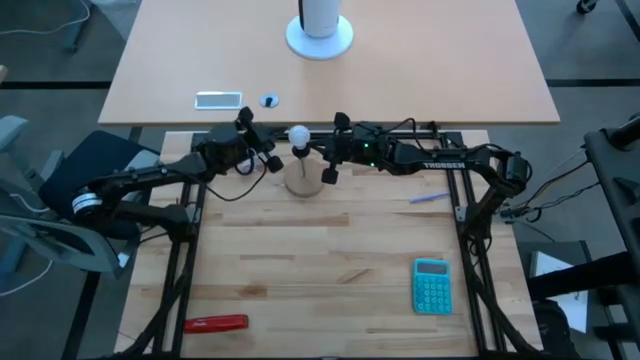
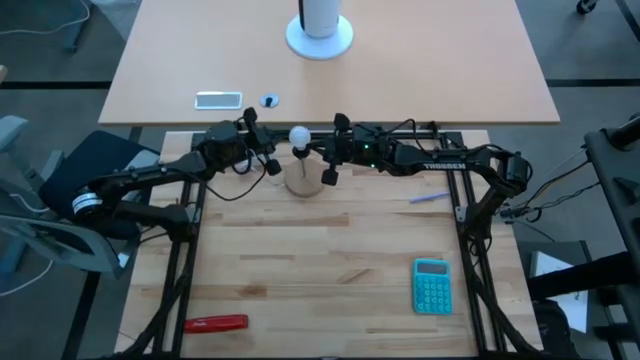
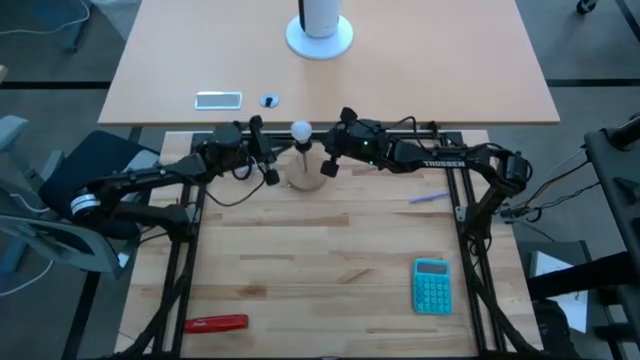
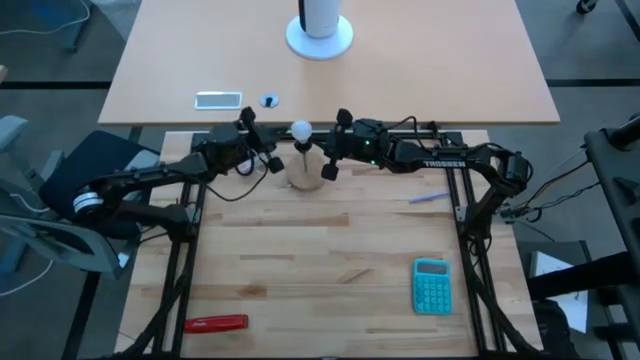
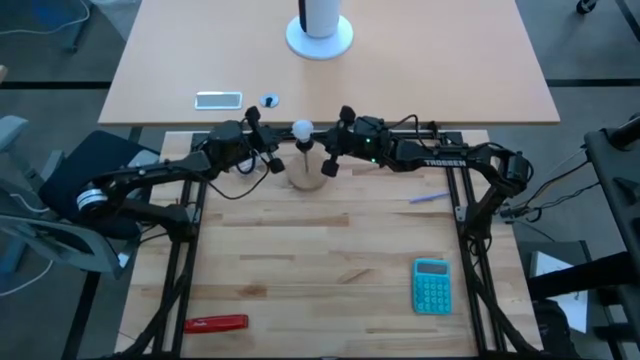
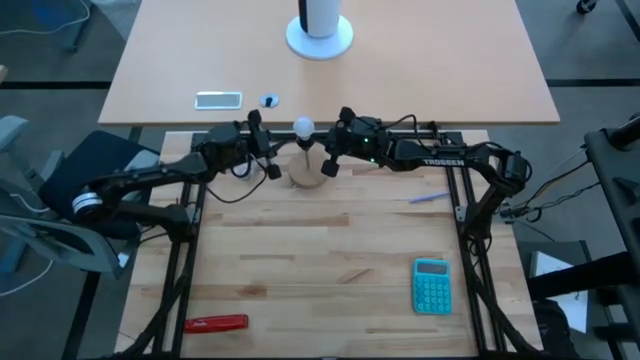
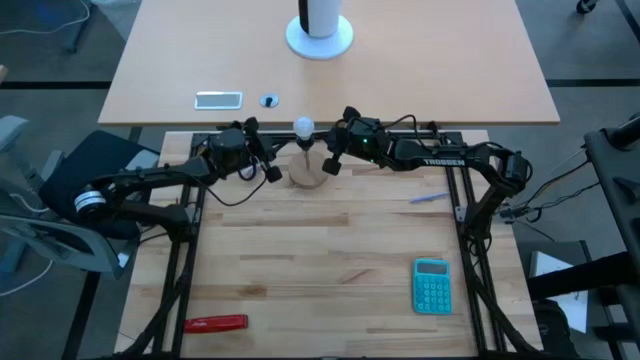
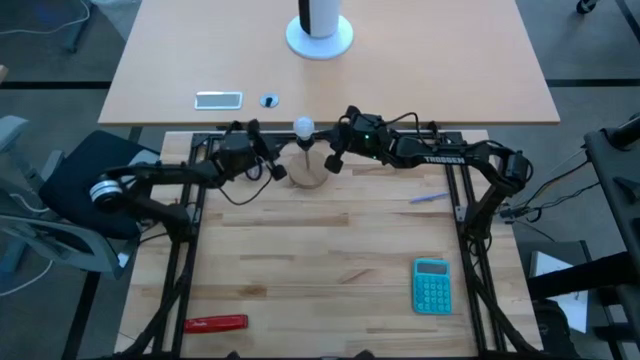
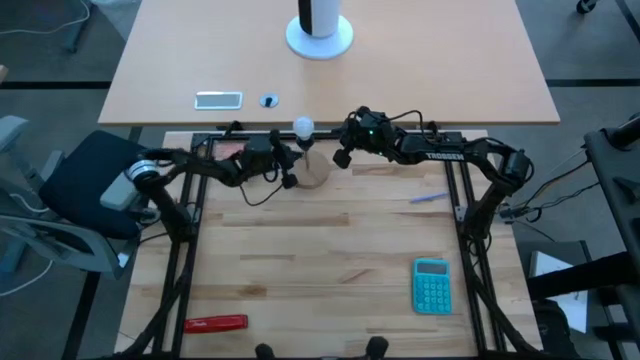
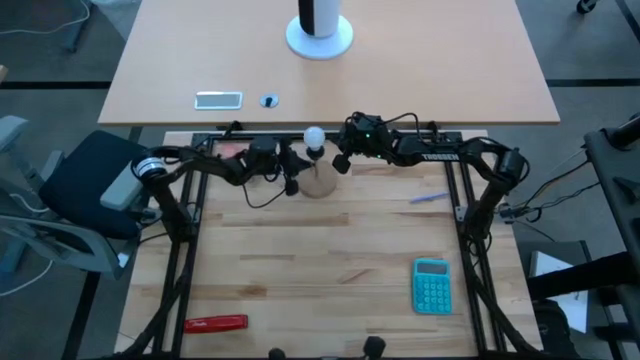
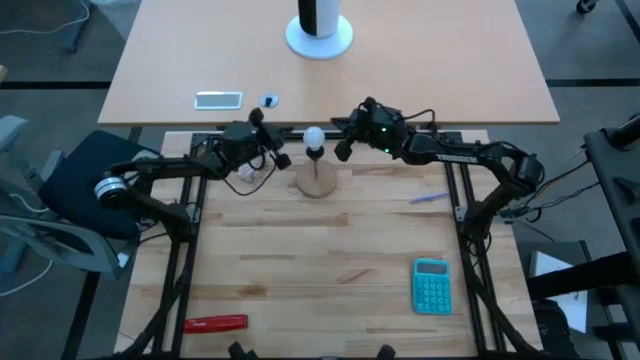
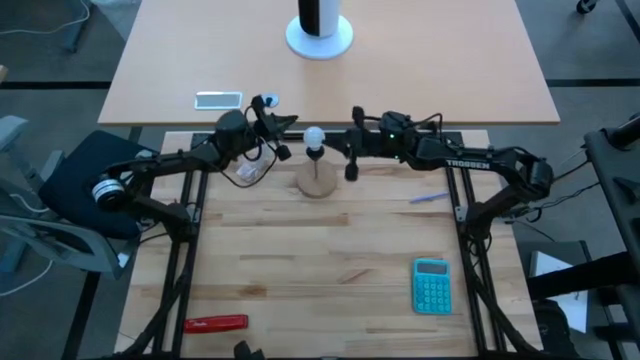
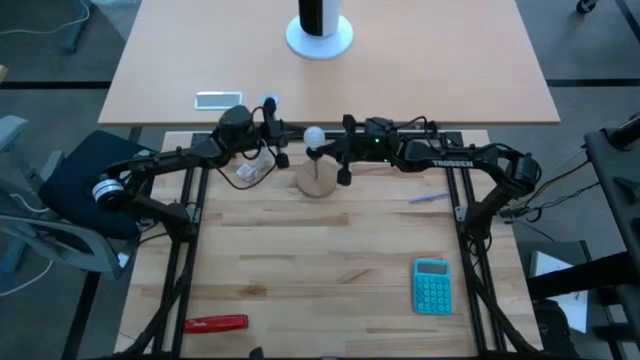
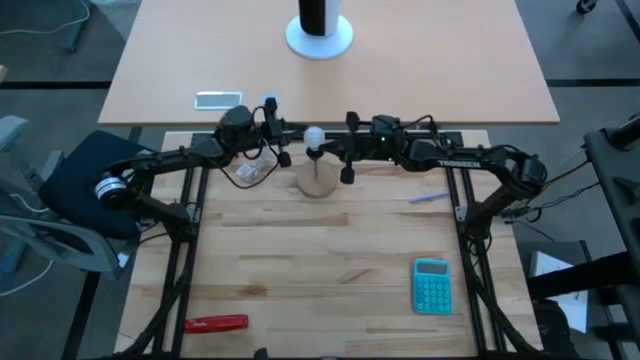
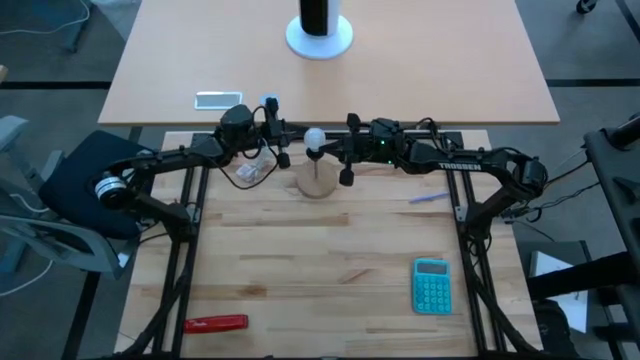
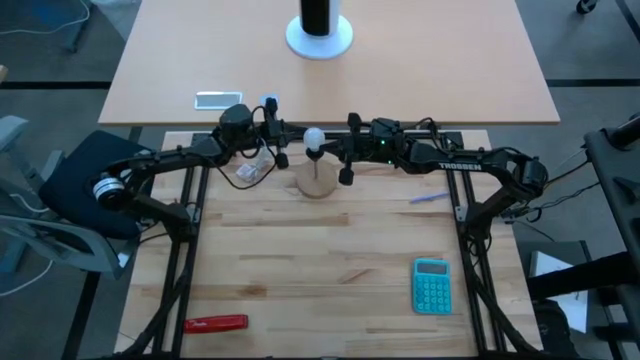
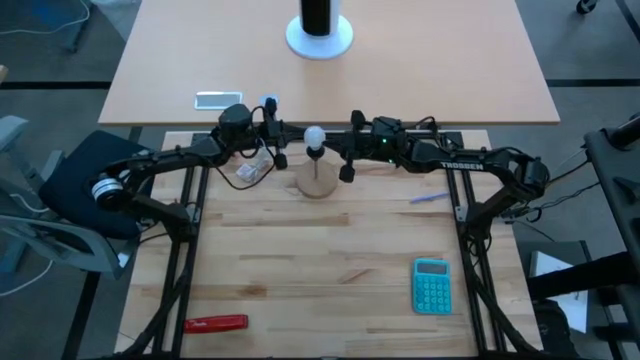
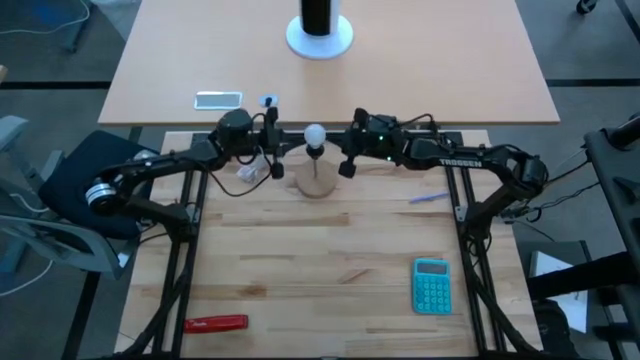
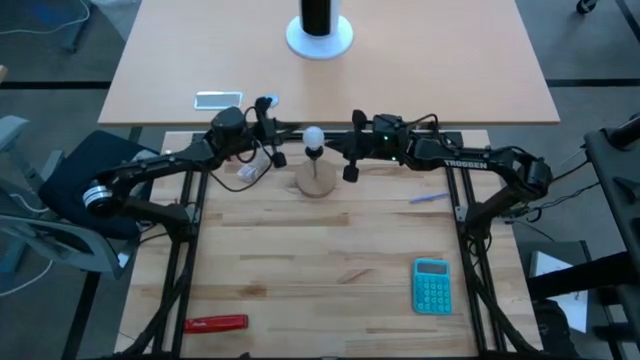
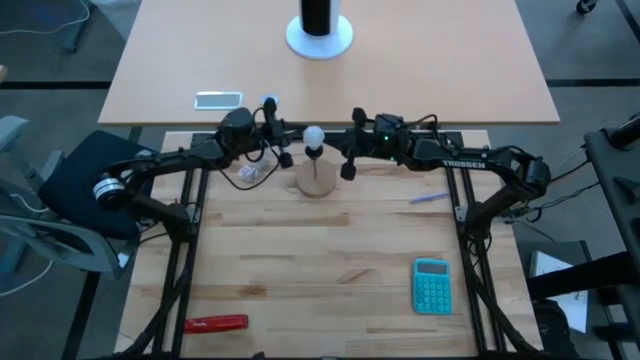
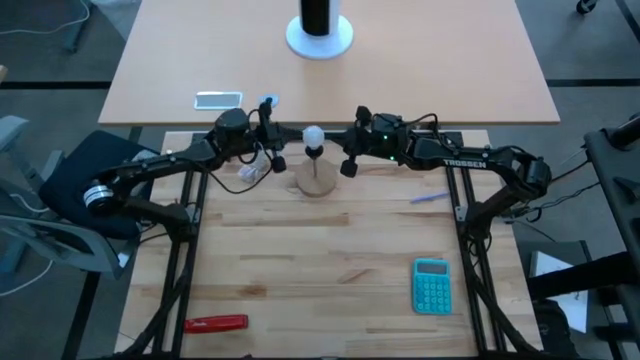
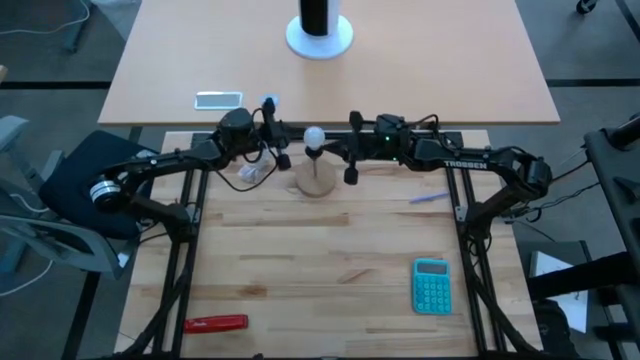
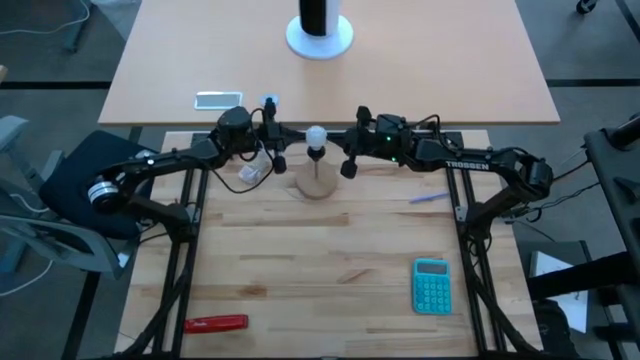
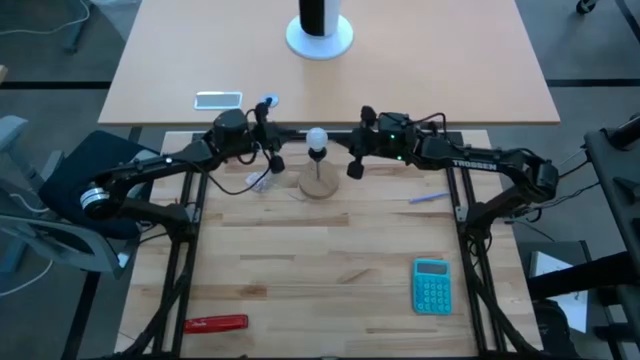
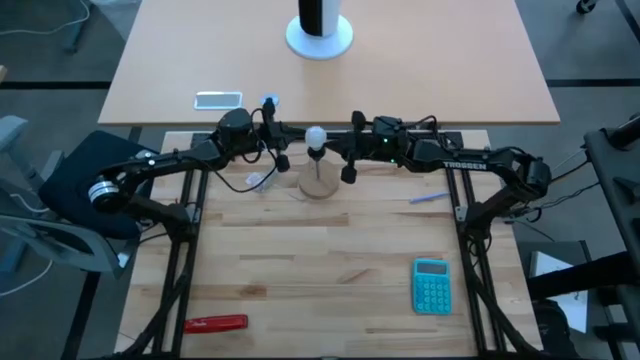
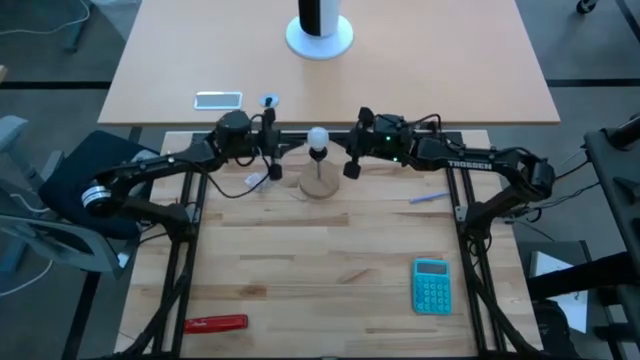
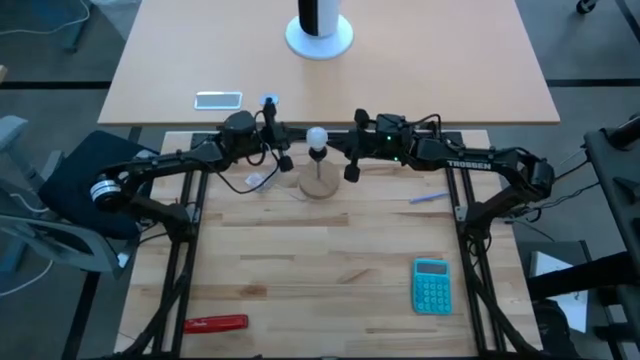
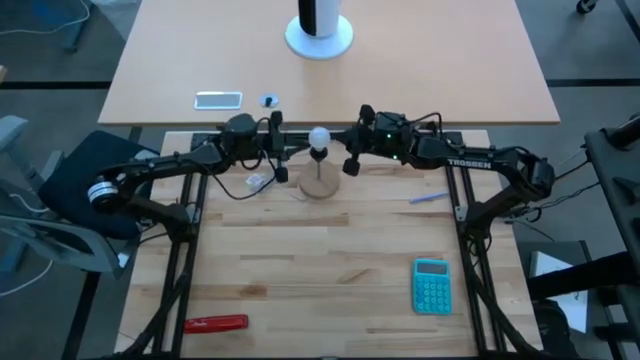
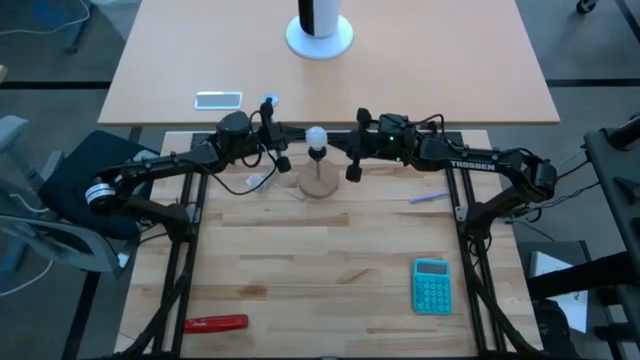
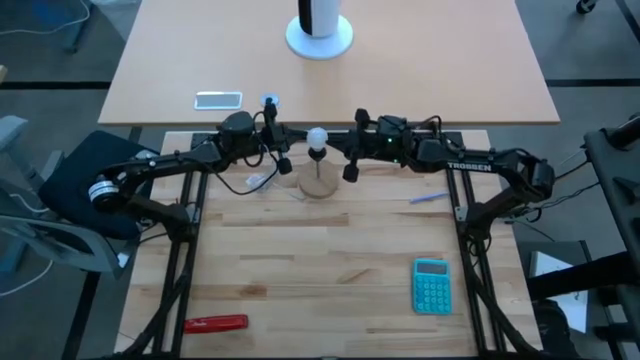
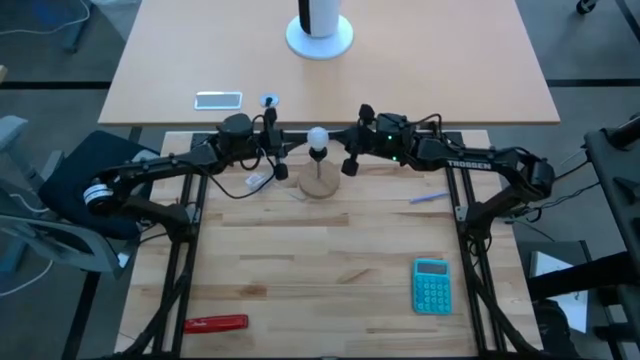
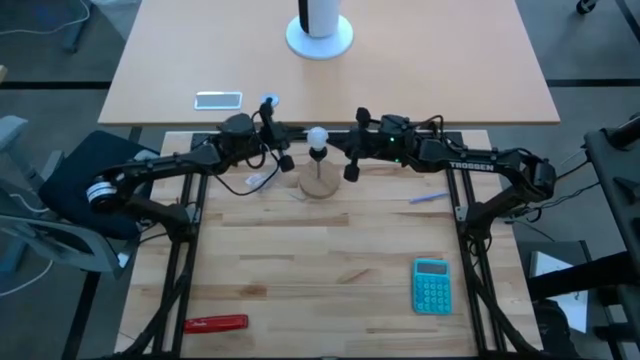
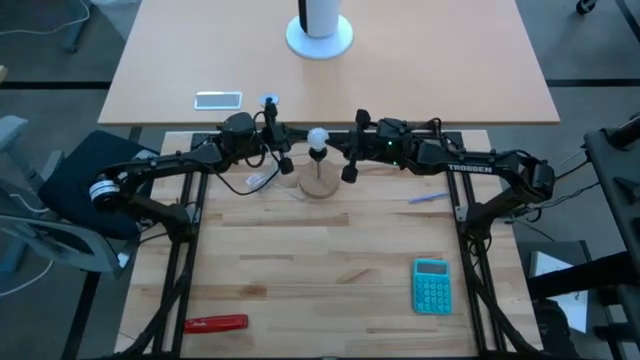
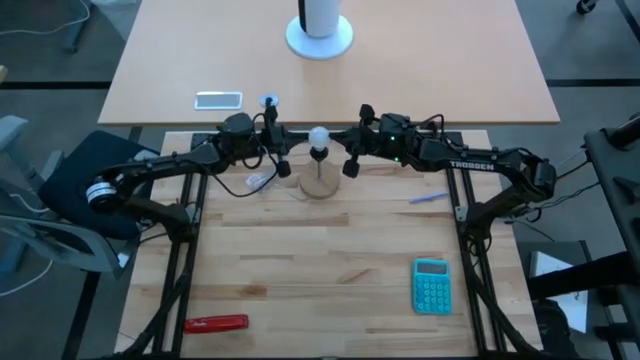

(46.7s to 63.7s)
Task: Screw lightbulb
Remove the light bulb from the bulb socket

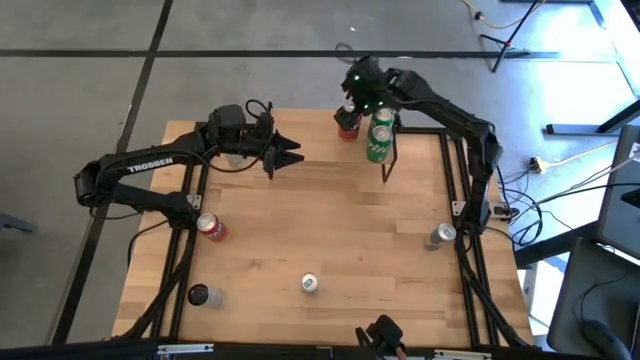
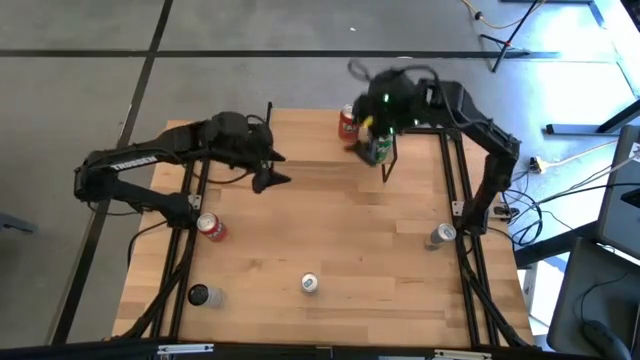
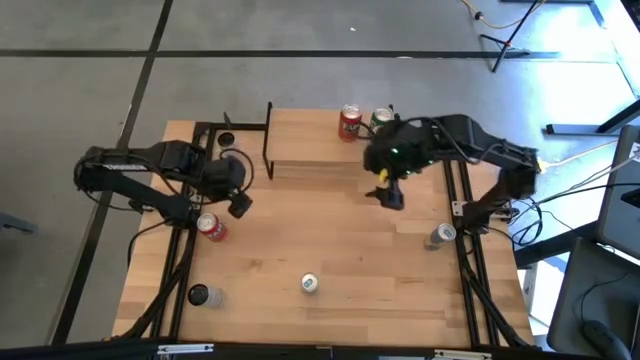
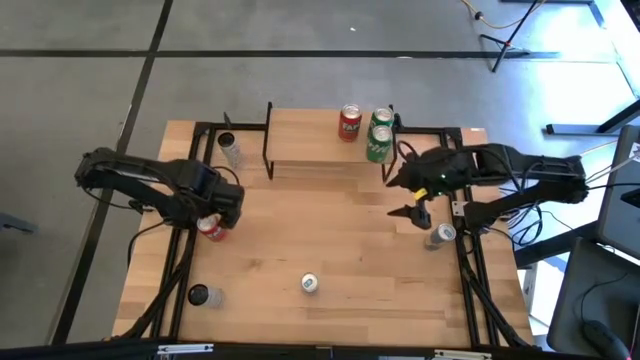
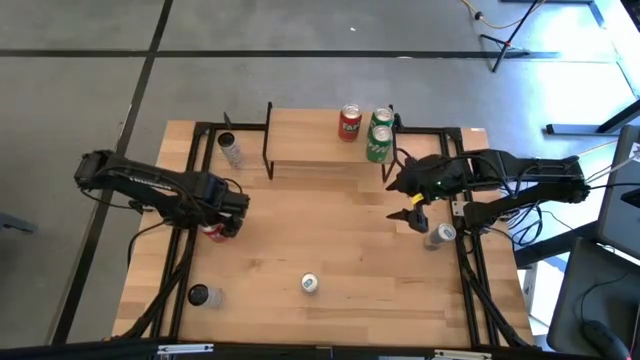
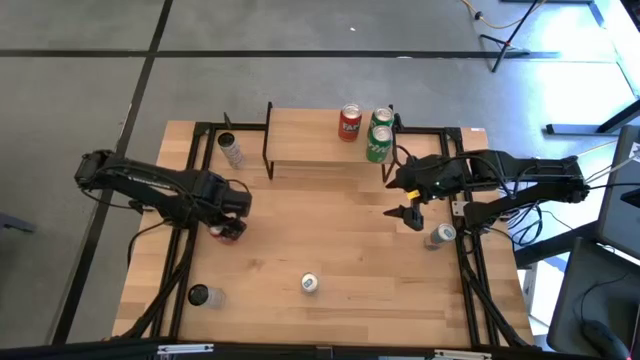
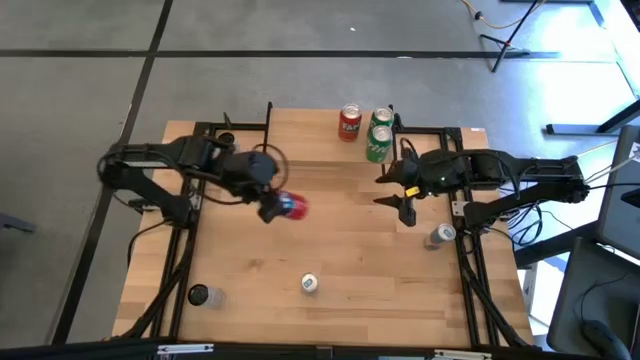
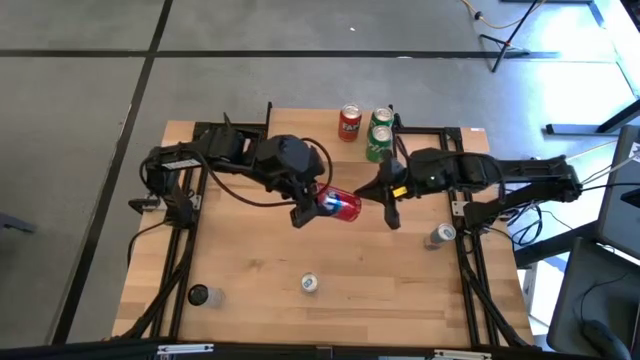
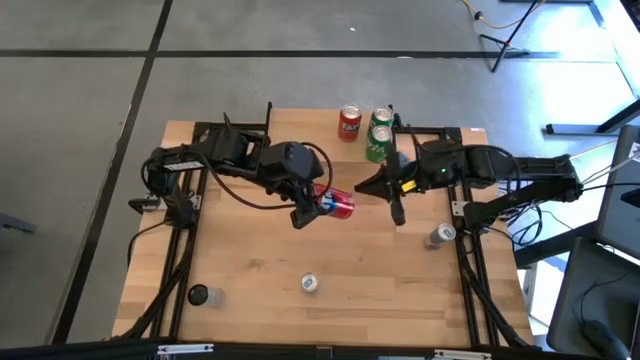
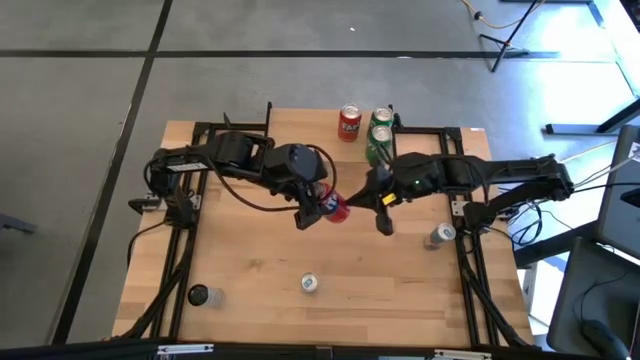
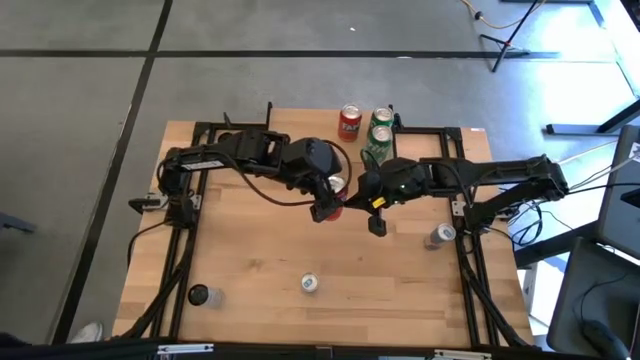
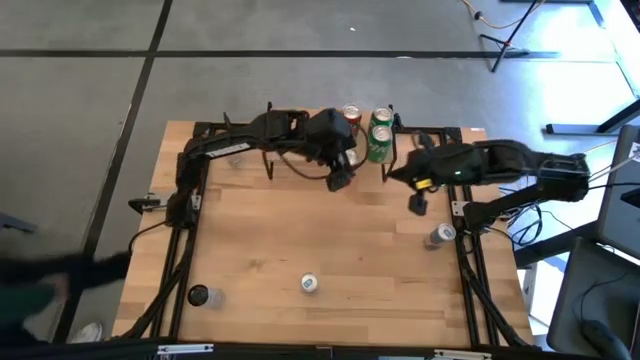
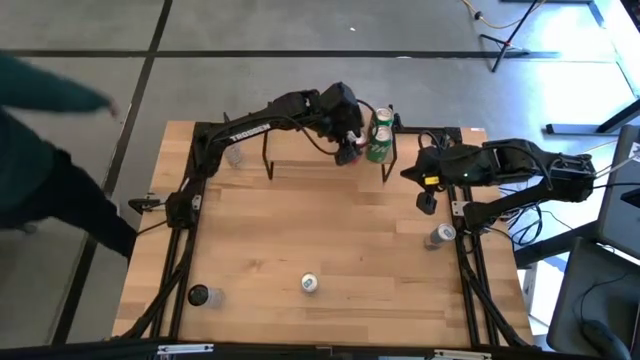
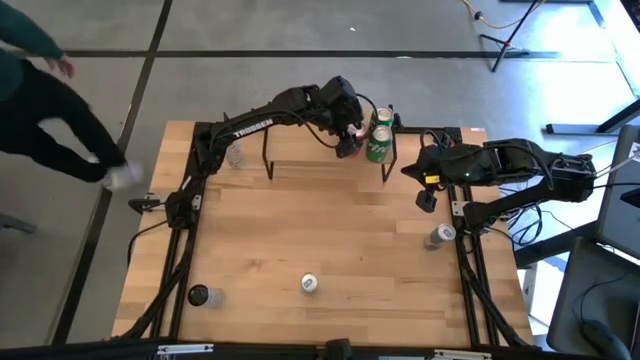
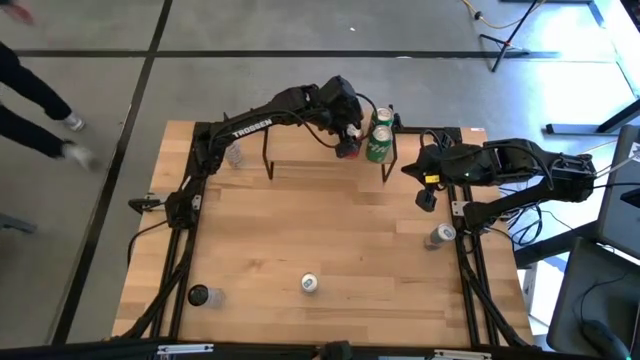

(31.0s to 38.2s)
Task: Place canned beverage on shelf
Put the orange soda can on the shelf aligned with the other orange soda can
